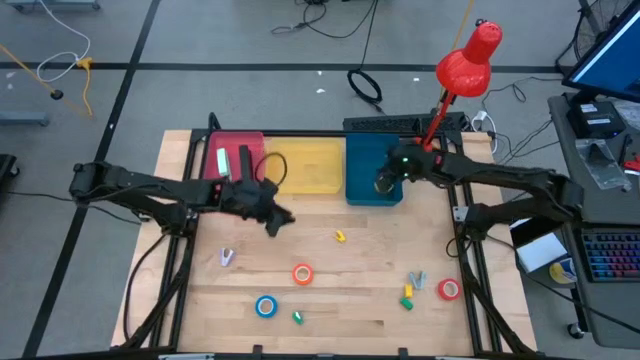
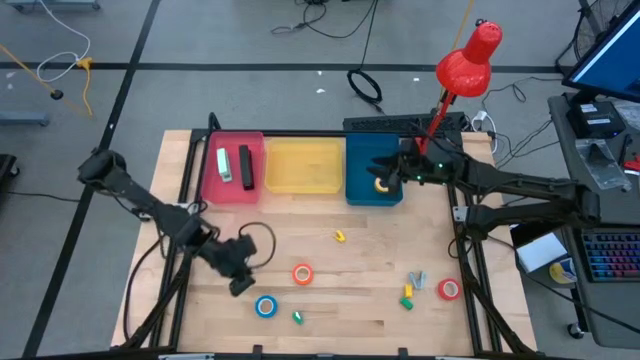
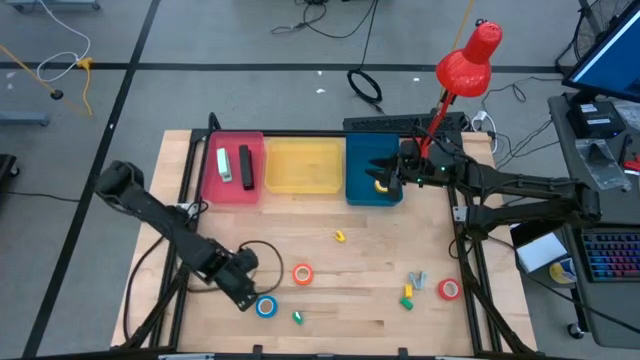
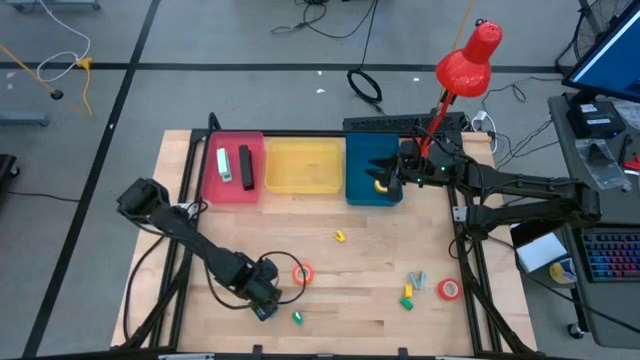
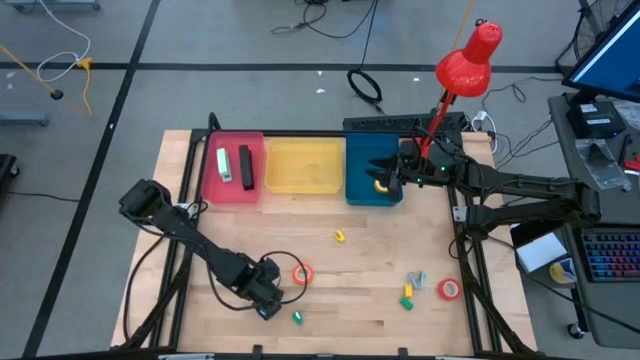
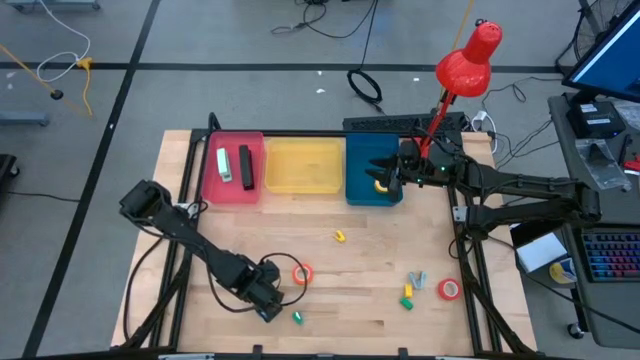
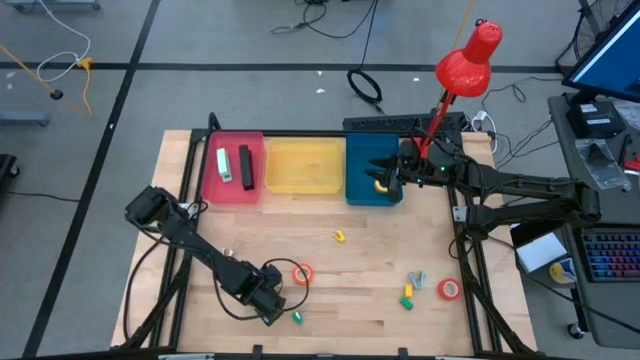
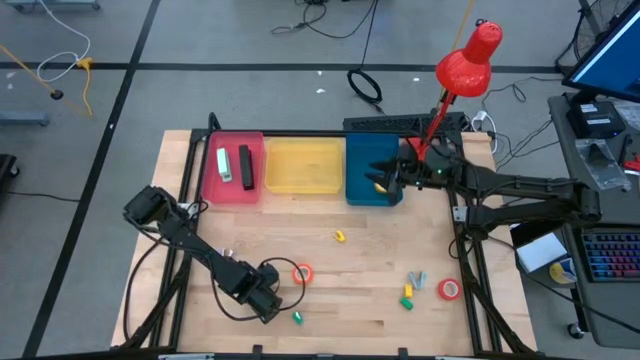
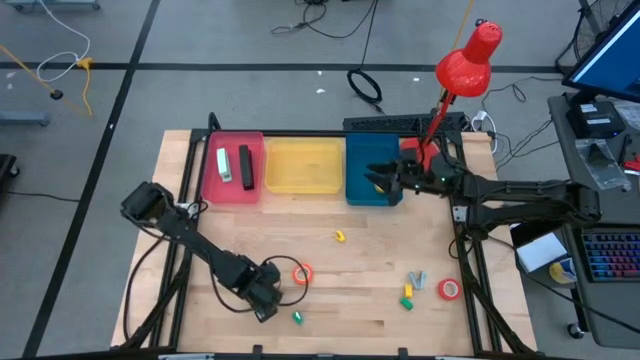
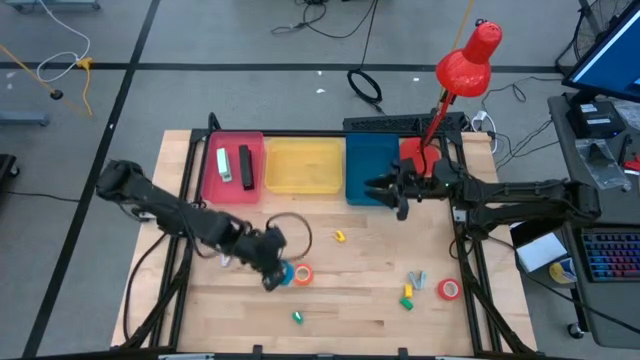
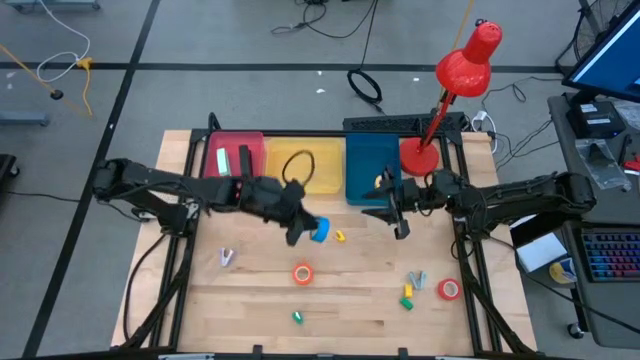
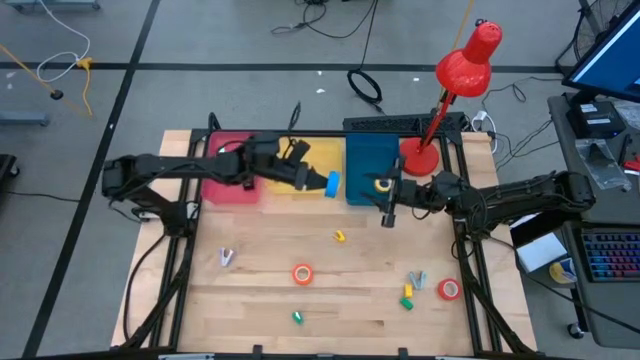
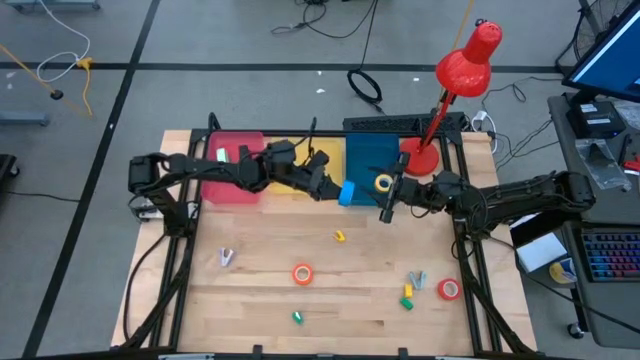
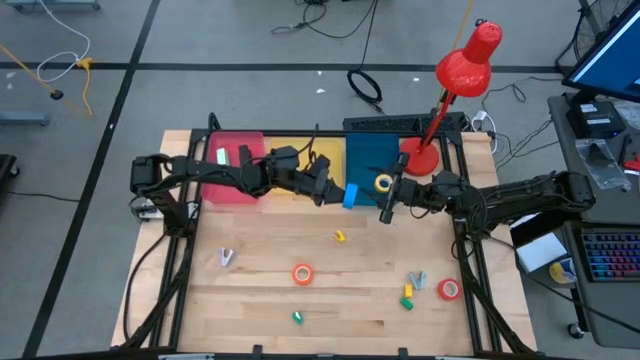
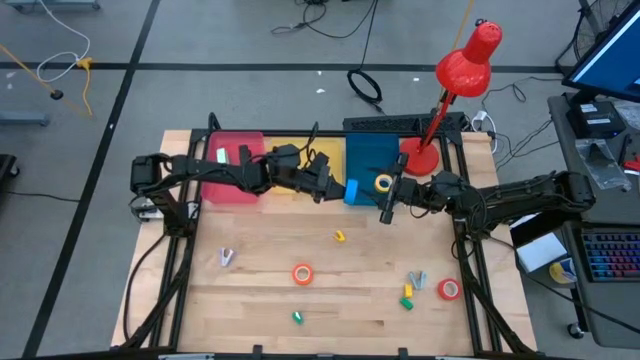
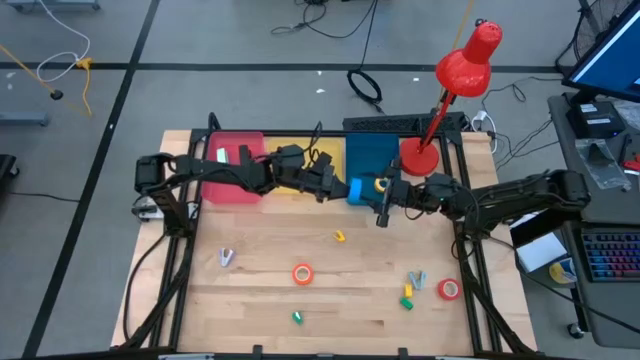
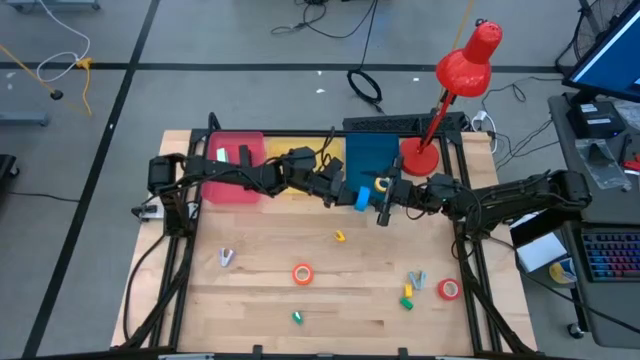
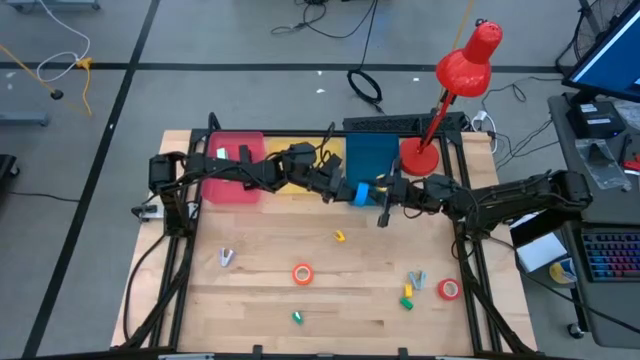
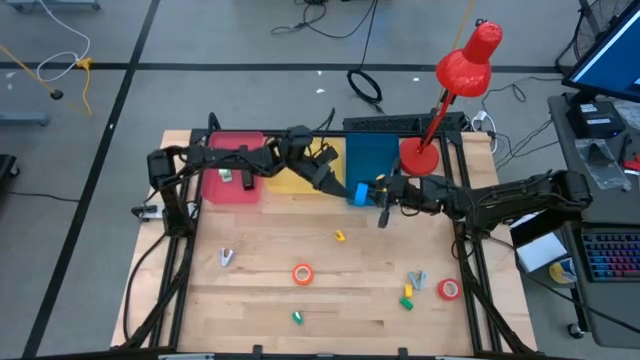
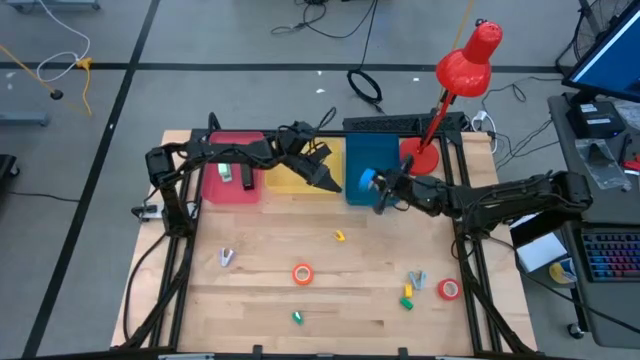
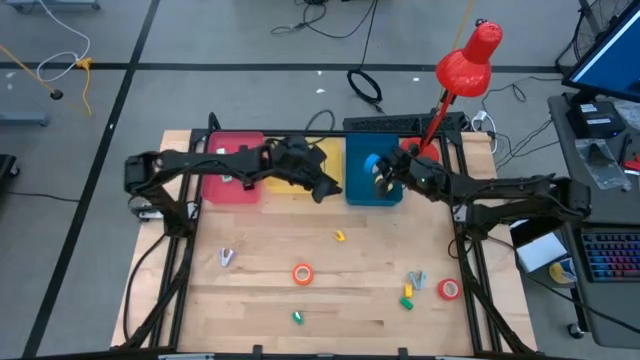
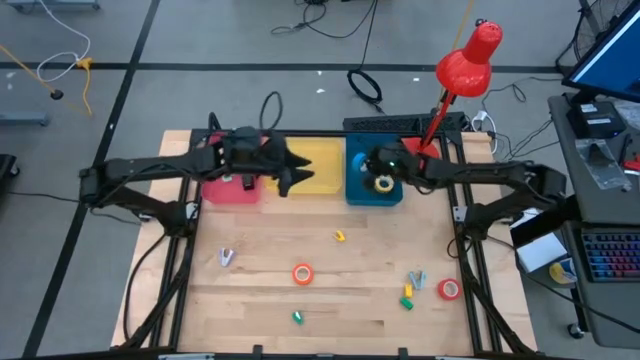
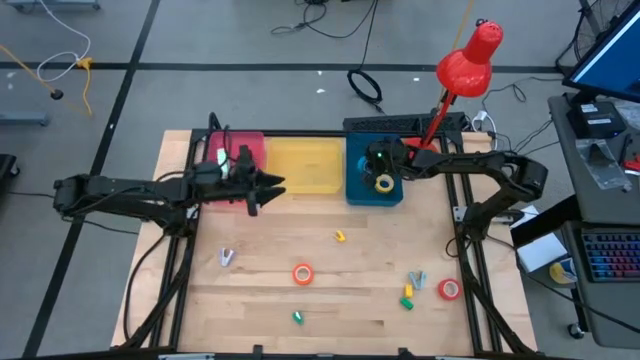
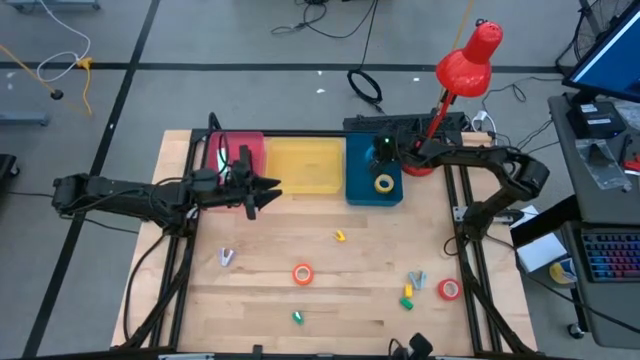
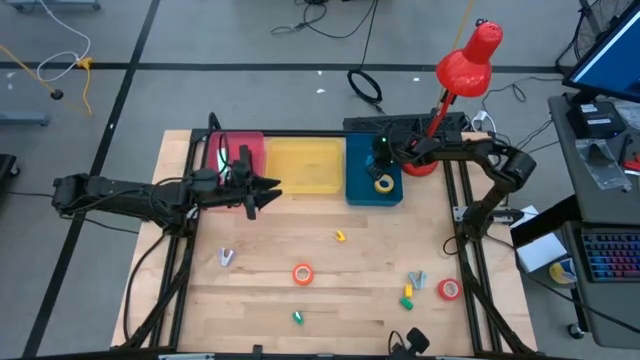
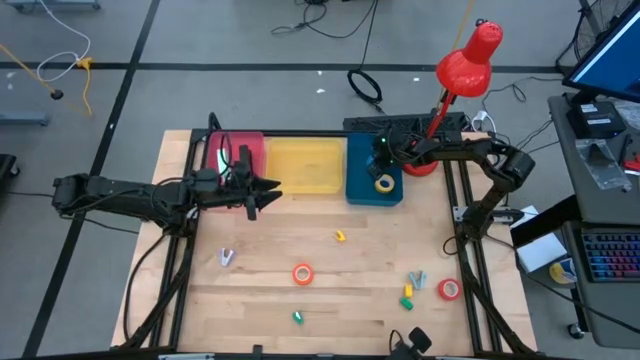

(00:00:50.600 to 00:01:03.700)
Task: Pick and place Stapler, Stapler remover, tape
Put the blue tape into the blue bin

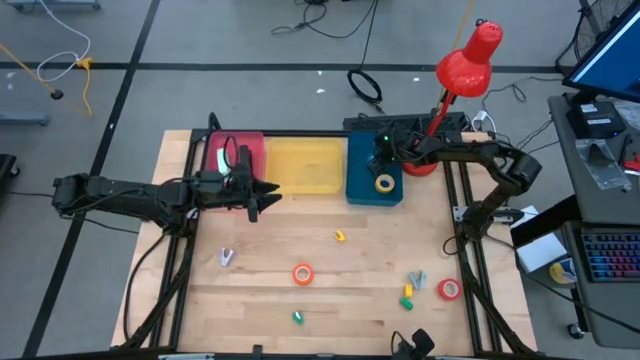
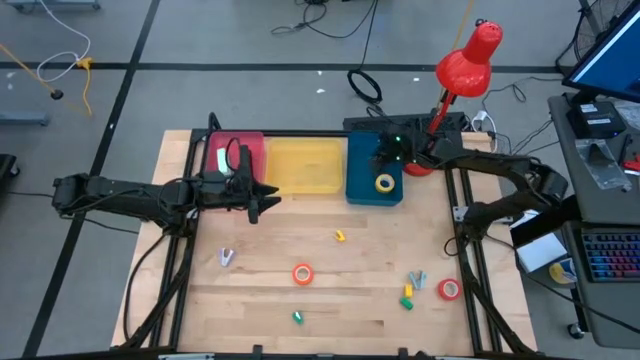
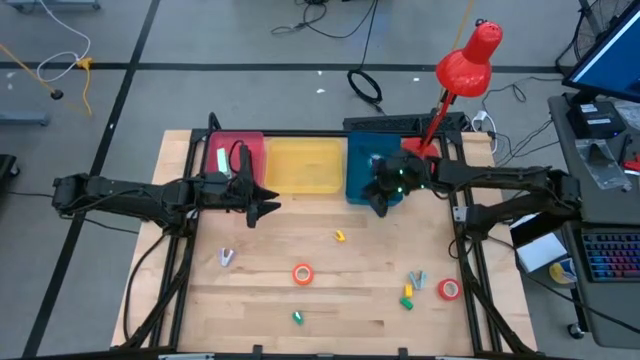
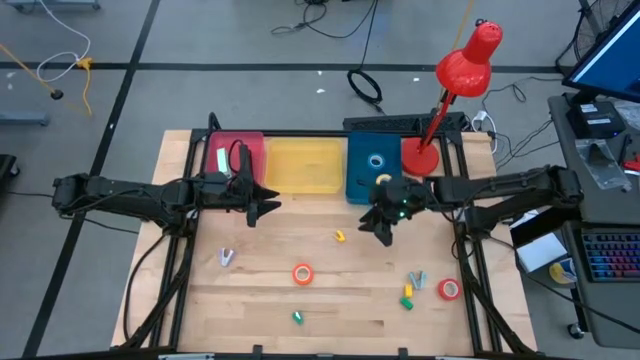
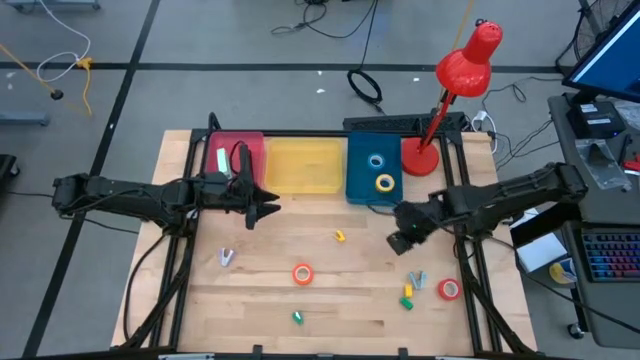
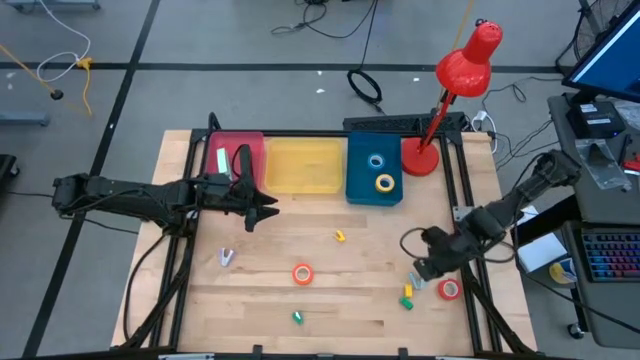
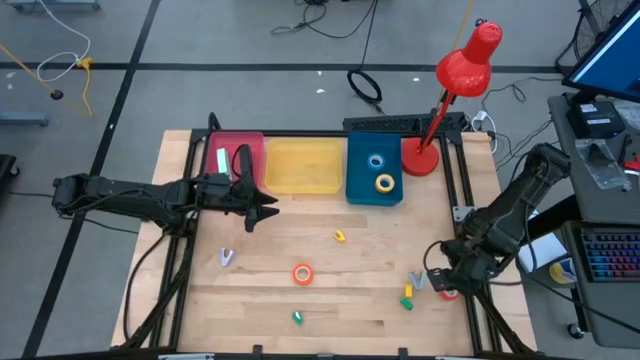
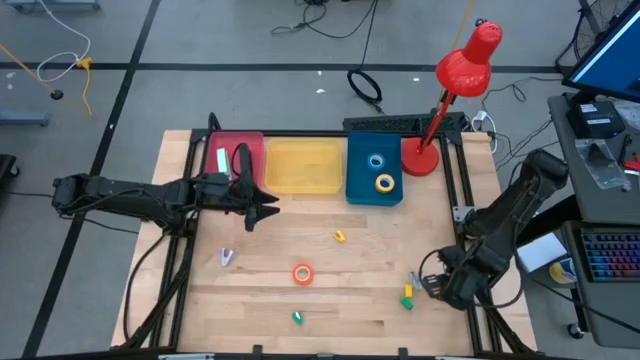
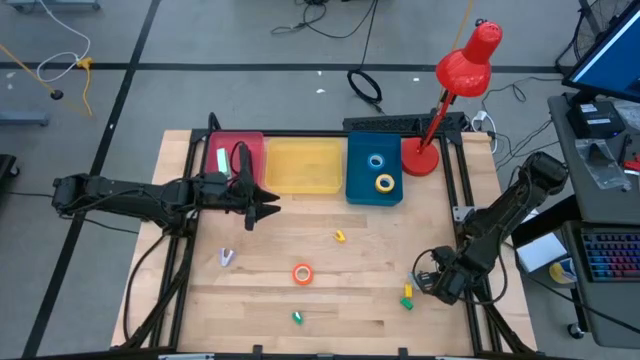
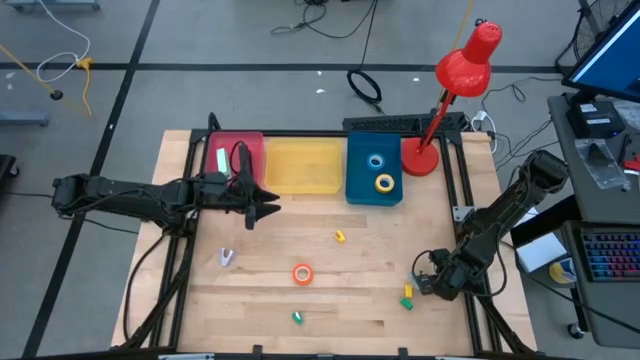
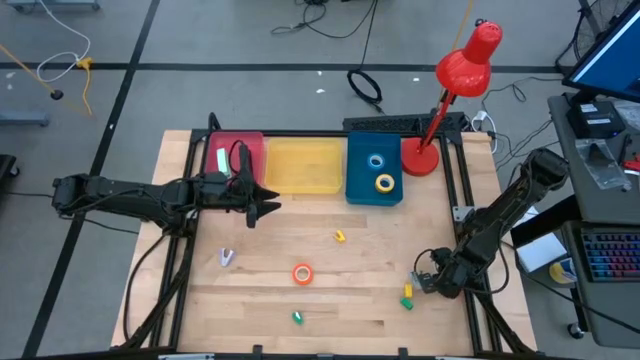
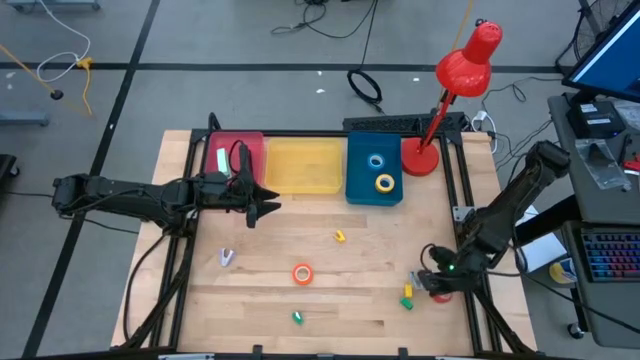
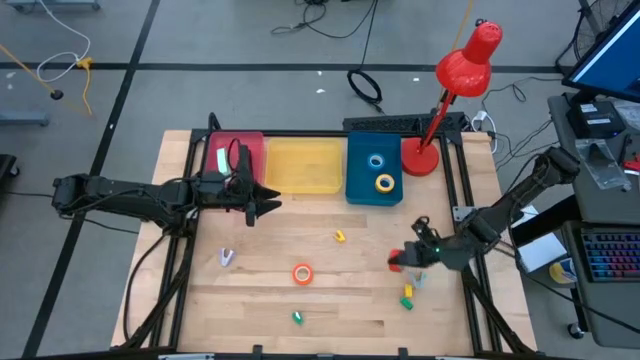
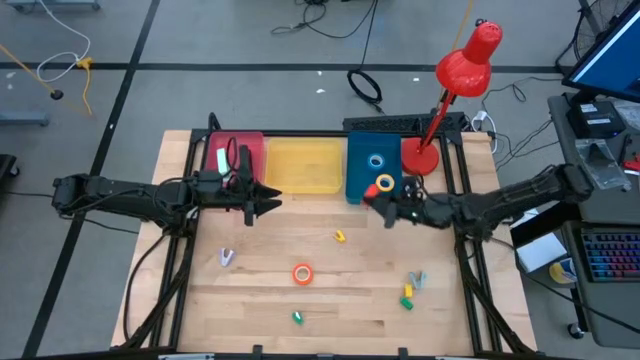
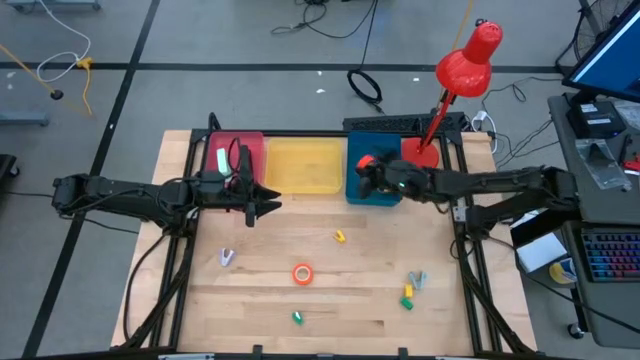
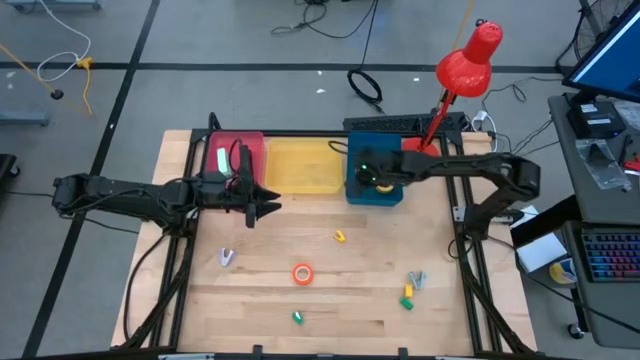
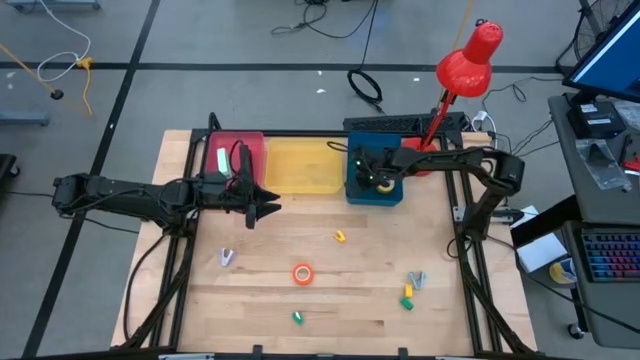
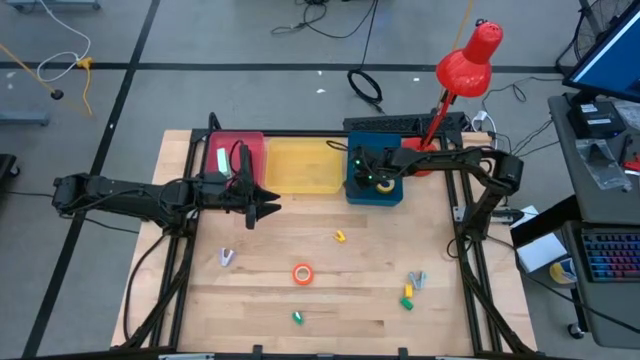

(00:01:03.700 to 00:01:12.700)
Put the red tape into the blue bin
